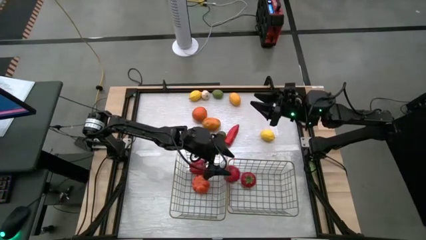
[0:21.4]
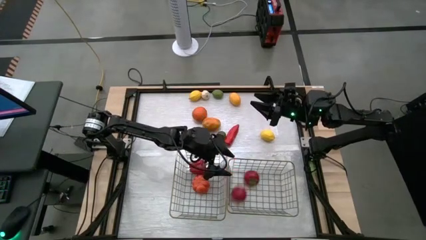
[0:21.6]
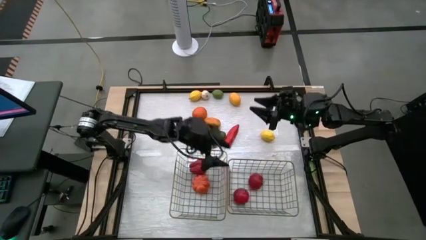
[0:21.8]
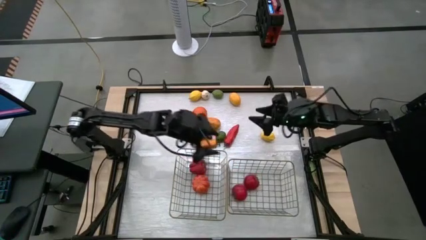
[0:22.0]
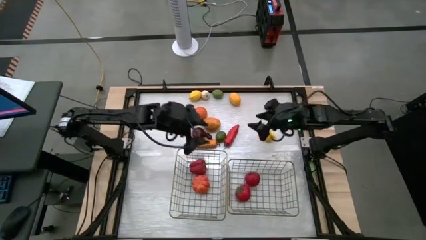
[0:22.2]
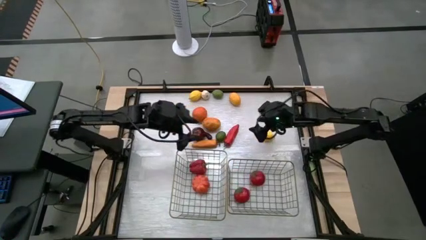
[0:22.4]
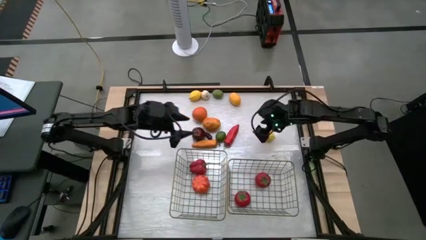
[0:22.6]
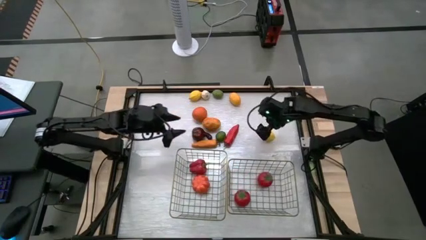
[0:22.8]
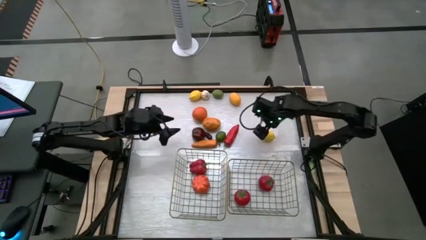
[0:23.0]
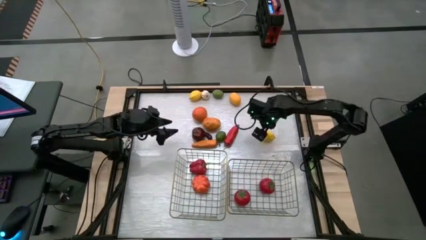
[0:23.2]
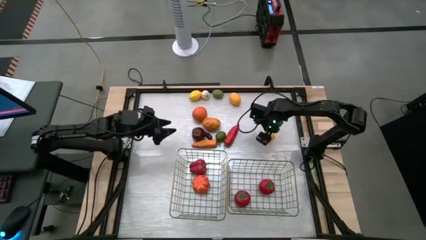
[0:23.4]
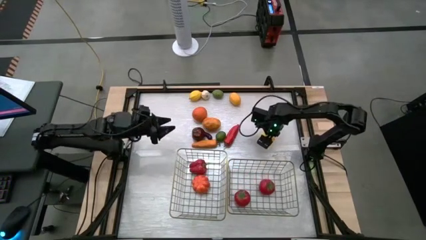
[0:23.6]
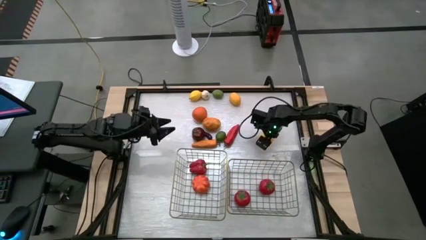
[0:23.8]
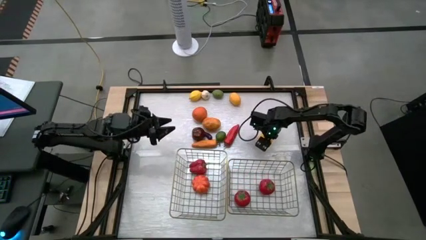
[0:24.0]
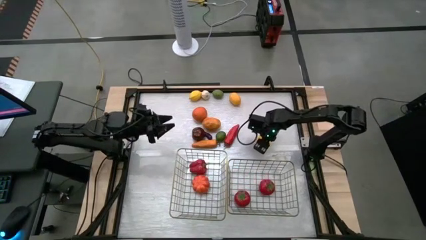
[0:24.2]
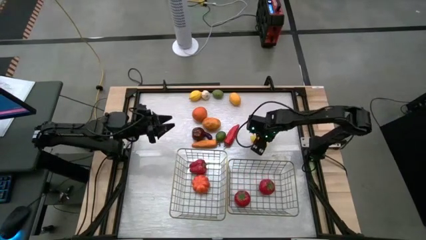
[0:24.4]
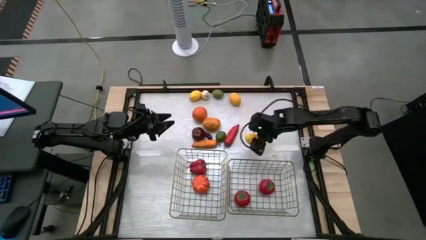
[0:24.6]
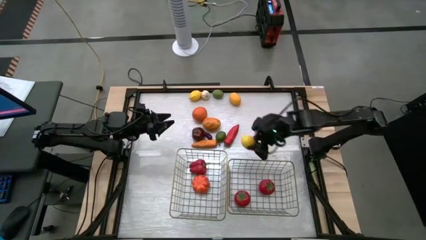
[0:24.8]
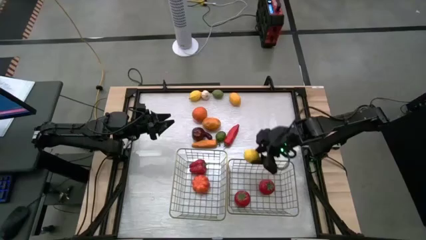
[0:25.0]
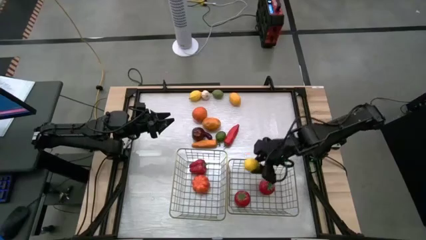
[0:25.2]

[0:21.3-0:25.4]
Task: Sort produce into baskets
Put the bottom right yellow lemon into the right wire basket

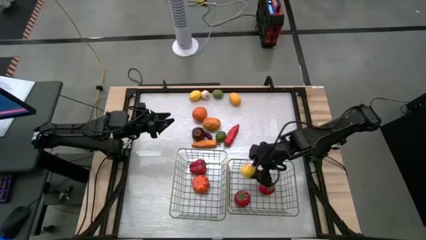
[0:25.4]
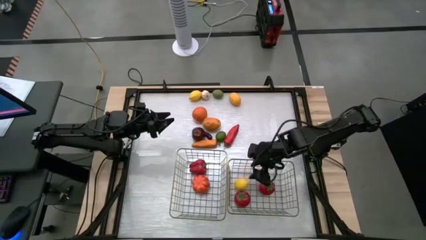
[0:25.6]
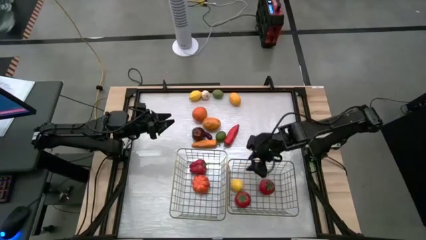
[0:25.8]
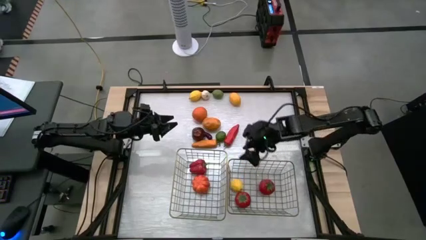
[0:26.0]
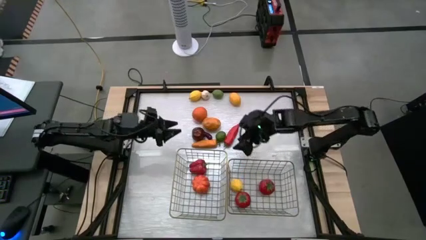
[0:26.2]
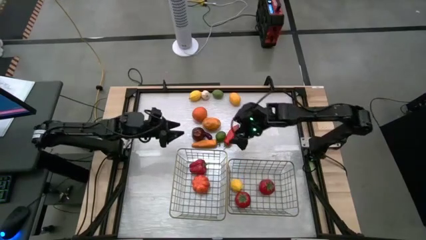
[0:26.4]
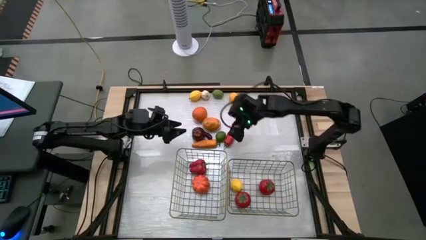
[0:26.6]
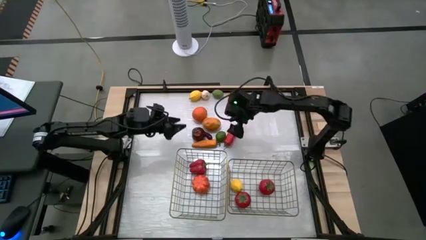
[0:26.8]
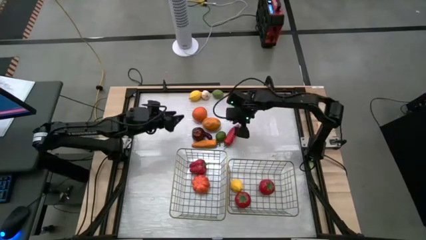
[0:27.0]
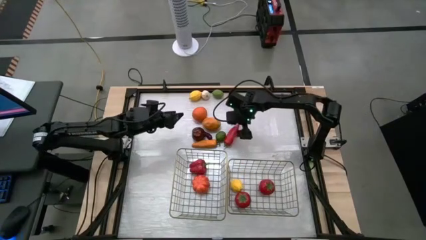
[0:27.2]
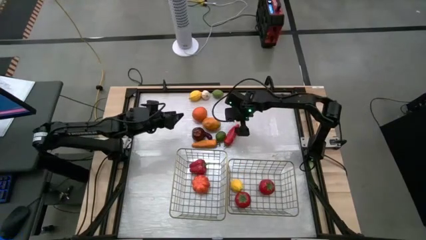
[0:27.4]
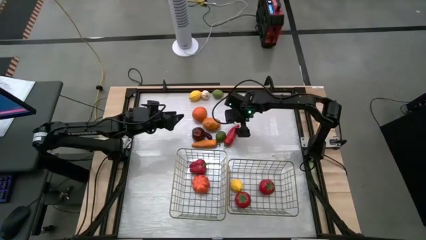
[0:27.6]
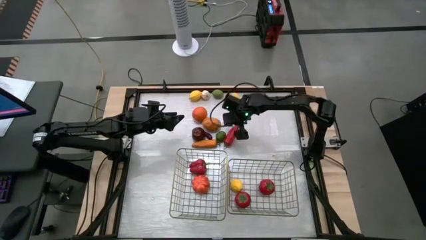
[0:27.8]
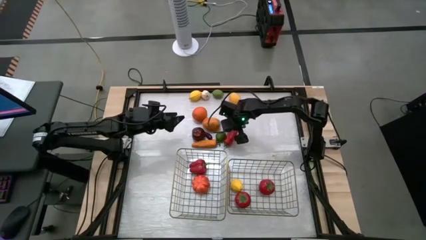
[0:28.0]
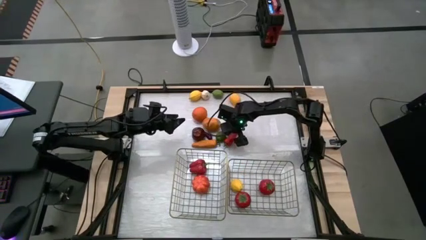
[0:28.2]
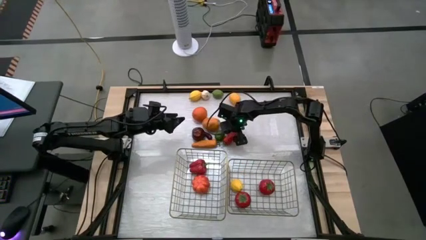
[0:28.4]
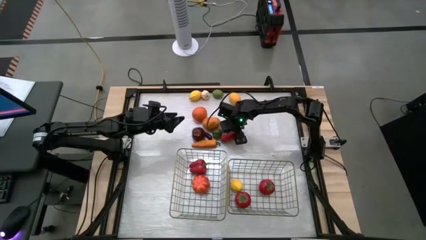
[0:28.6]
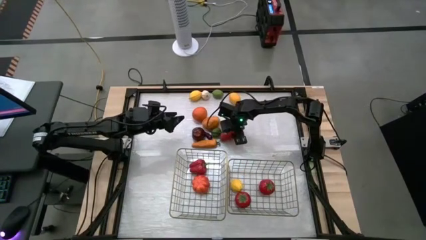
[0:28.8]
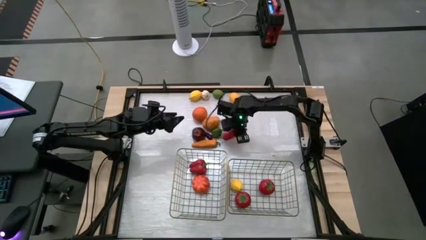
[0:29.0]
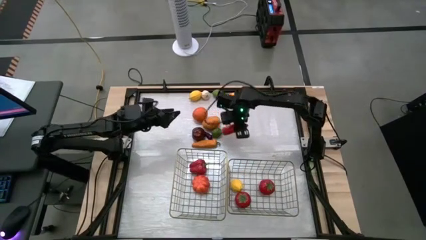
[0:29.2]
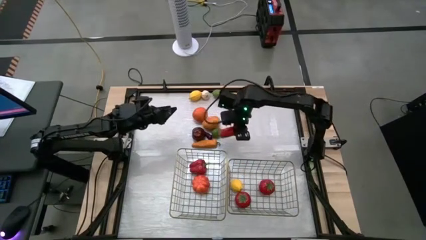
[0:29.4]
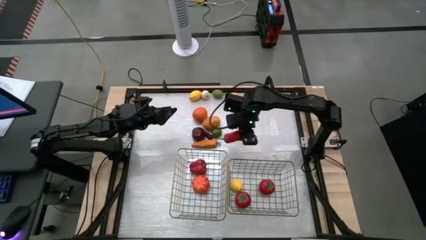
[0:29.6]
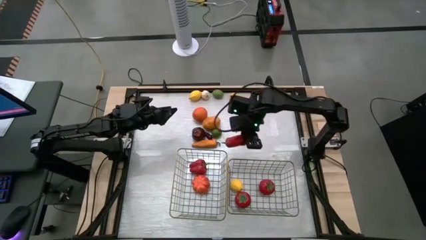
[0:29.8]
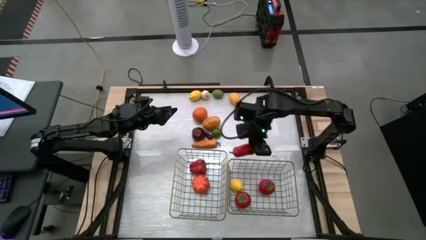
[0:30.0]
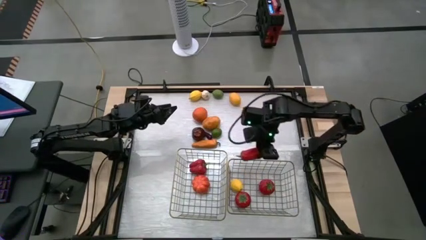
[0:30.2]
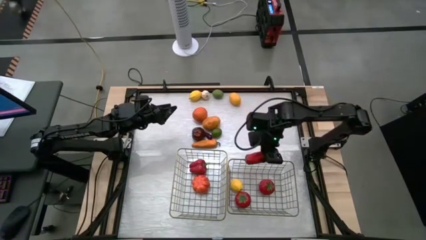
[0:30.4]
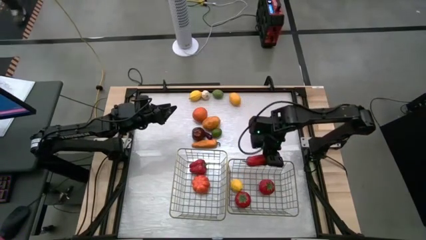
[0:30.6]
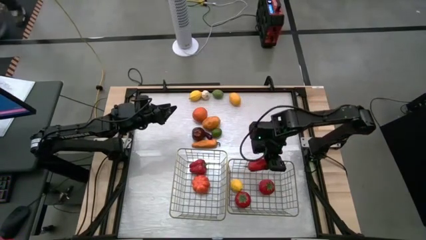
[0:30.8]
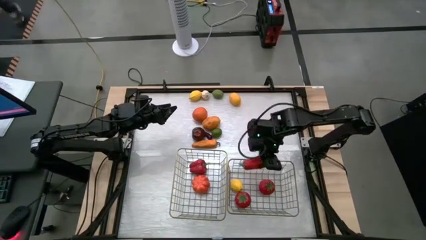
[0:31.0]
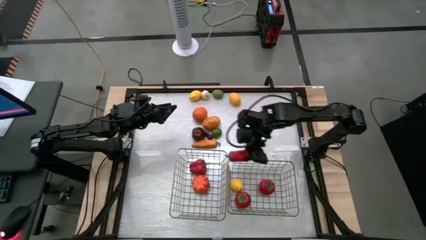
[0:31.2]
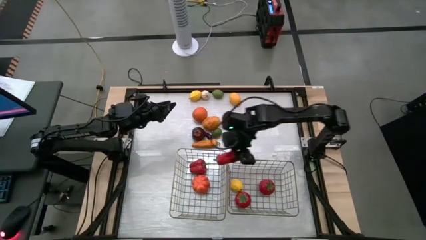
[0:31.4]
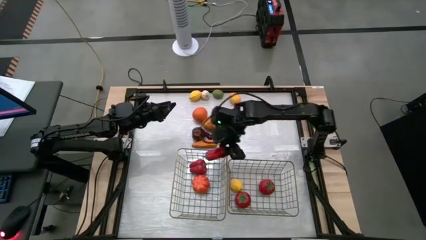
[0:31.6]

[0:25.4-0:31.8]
Put the red chili into the left wire basket

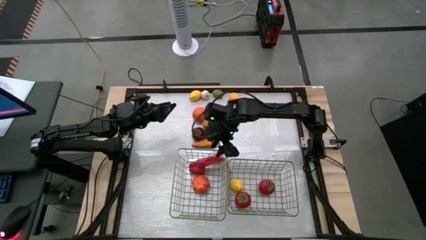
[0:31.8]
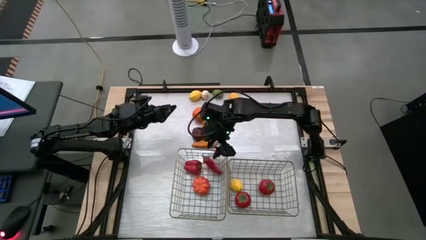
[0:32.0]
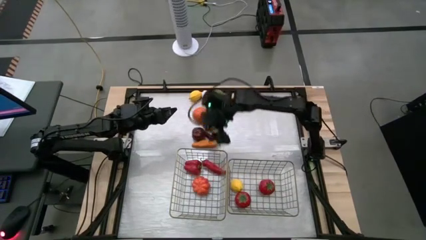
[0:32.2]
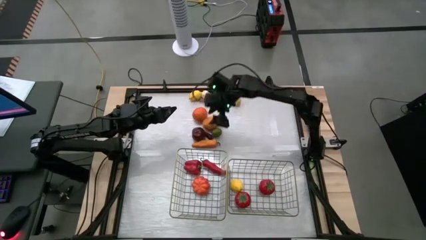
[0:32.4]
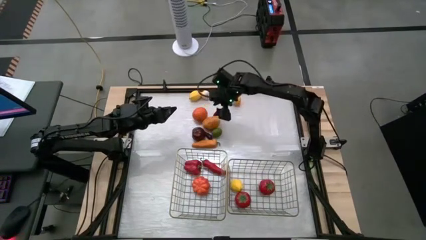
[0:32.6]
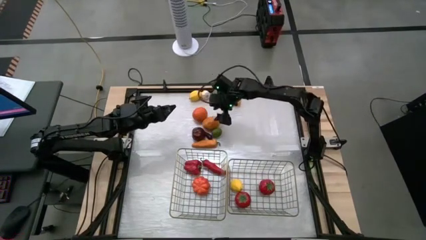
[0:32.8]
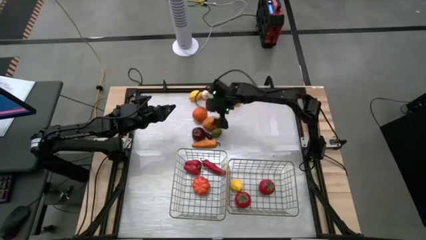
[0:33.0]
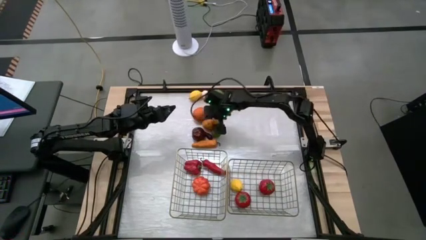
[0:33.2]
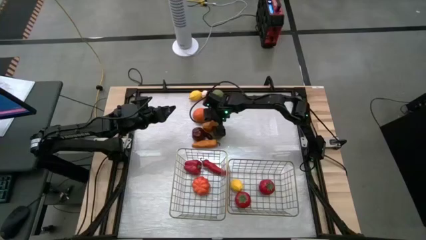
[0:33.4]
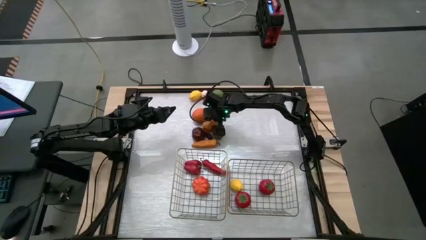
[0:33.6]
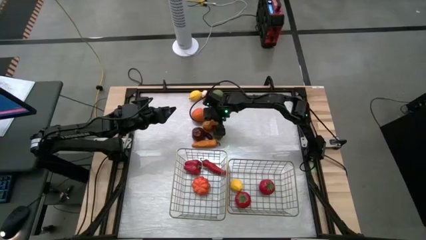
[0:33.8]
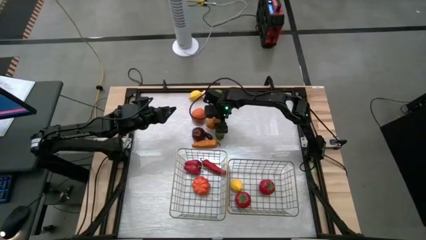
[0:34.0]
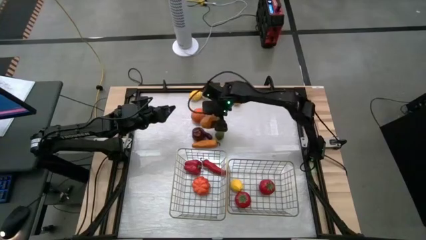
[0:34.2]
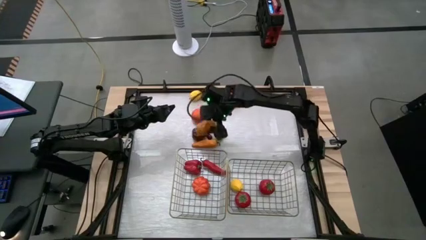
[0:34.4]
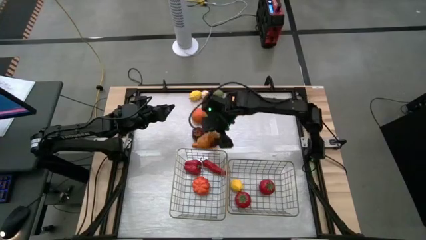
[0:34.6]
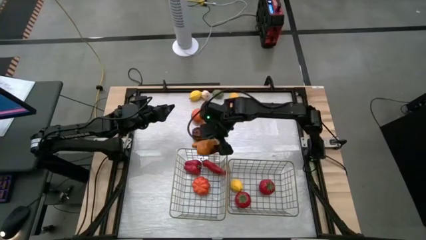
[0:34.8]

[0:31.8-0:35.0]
Put the potato into the left wire basket

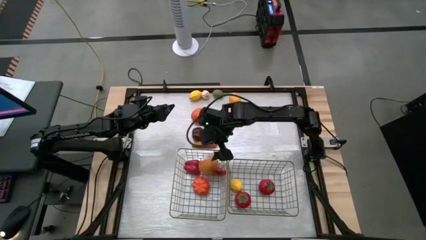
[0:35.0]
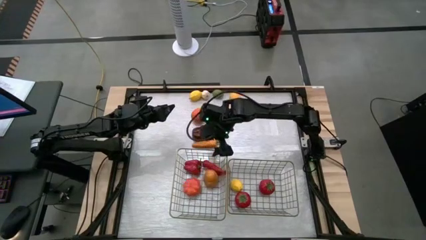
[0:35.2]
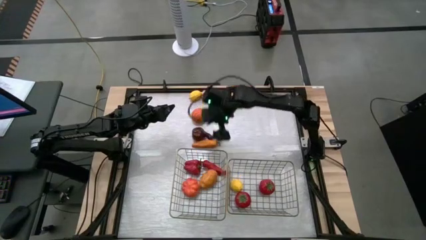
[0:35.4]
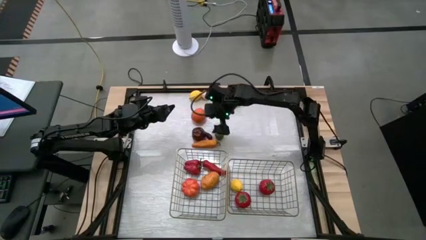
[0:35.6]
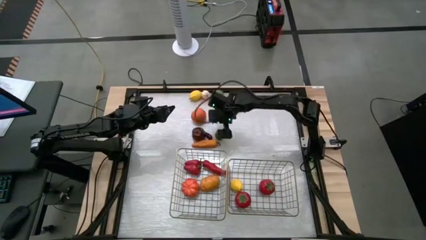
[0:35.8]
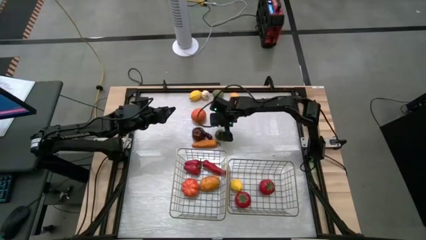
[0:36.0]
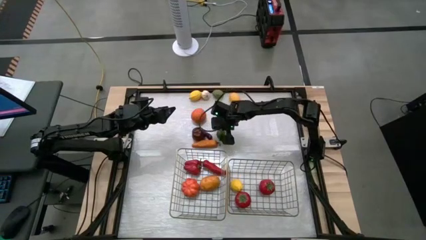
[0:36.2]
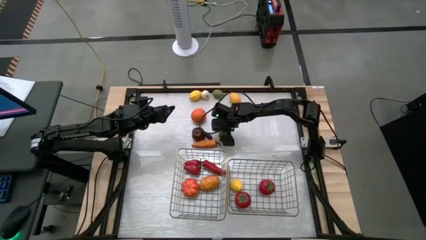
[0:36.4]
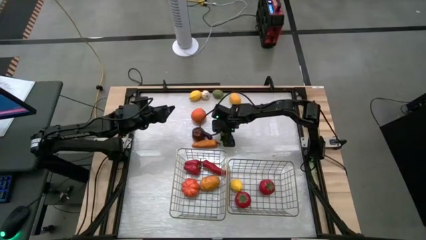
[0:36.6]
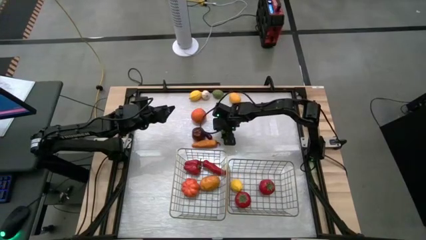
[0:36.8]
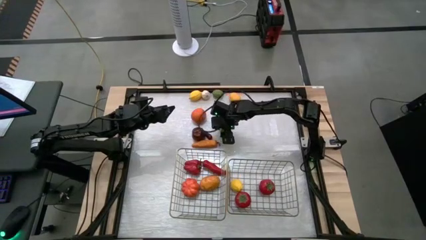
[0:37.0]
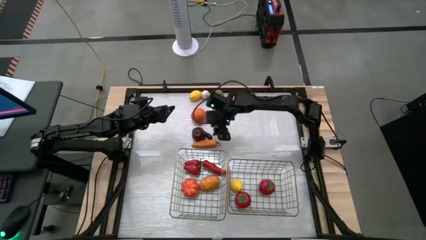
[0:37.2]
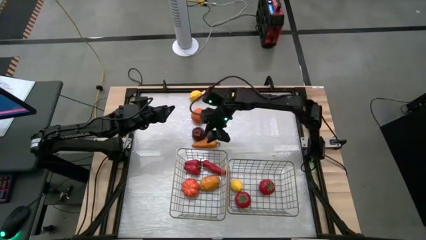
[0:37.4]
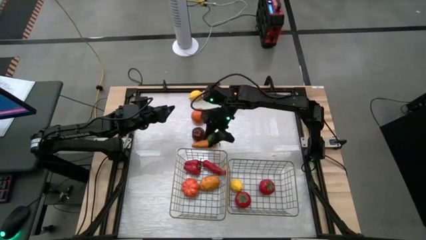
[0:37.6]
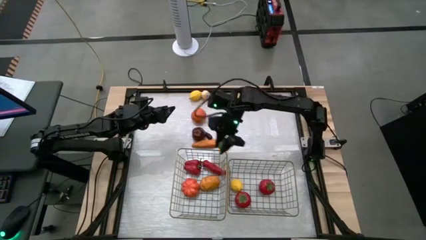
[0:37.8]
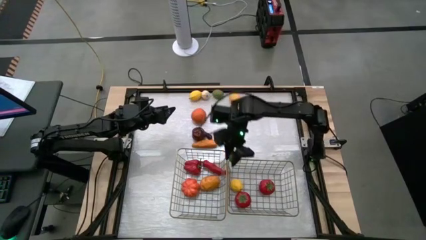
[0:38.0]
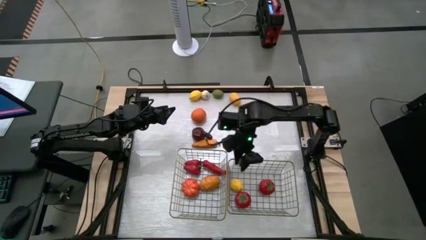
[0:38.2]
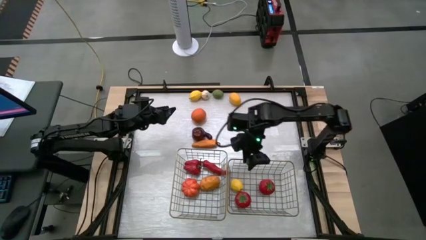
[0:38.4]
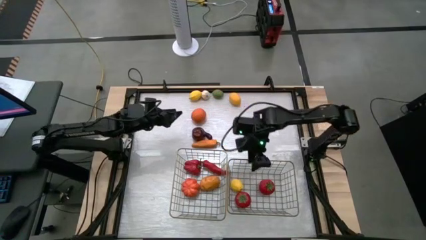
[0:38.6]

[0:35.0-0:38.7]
Put the bottom green lime into the right wire basket
